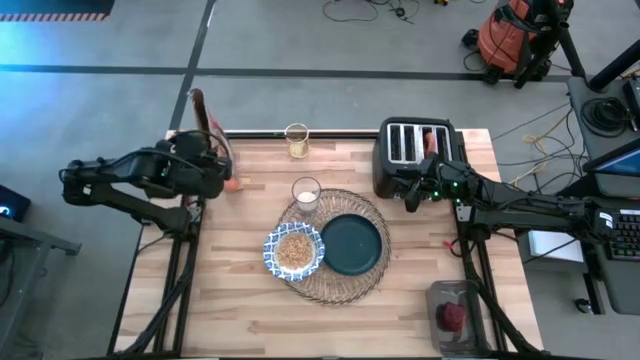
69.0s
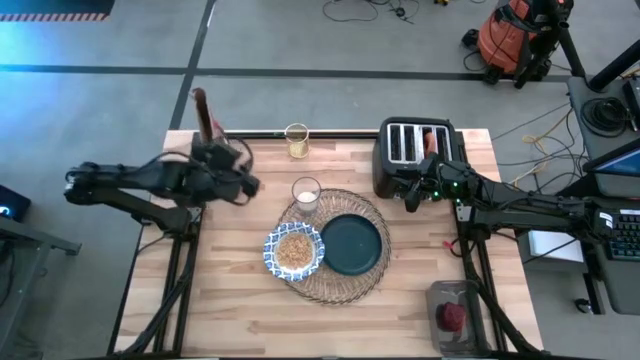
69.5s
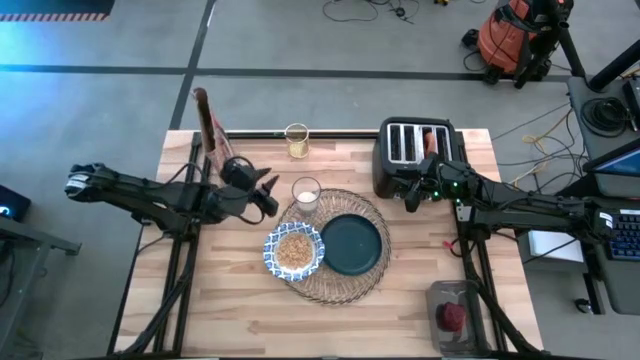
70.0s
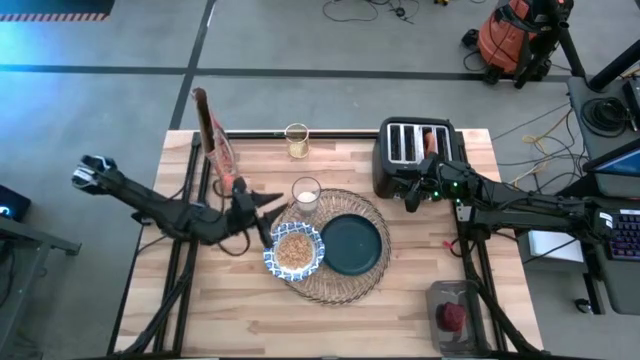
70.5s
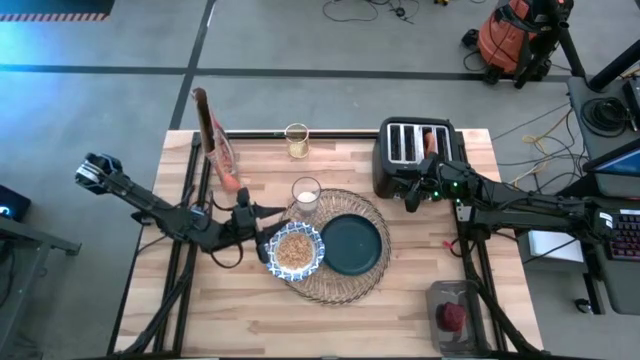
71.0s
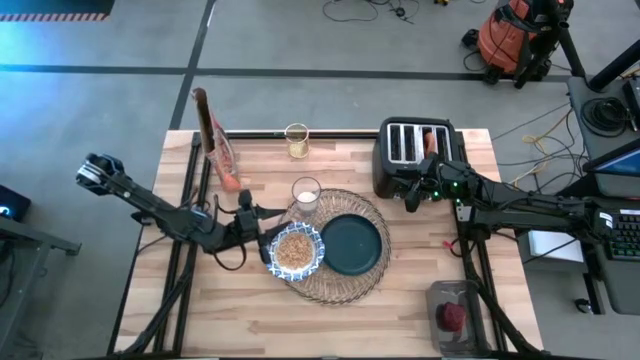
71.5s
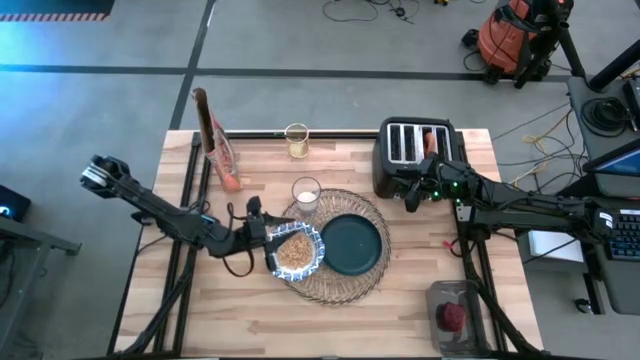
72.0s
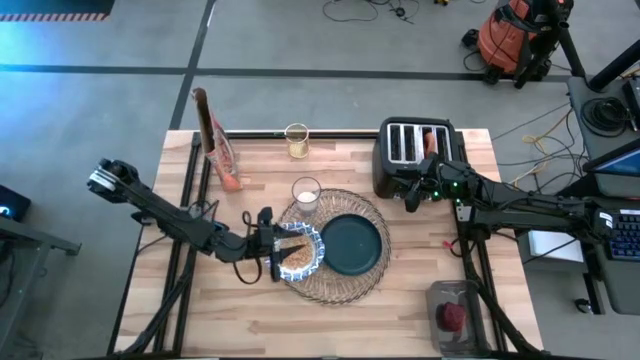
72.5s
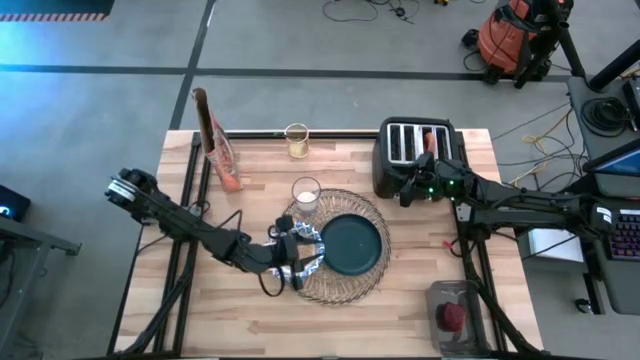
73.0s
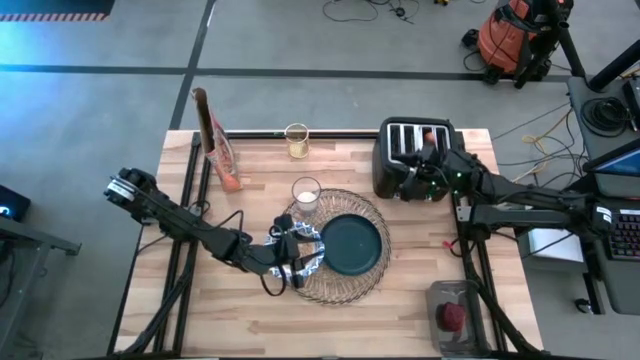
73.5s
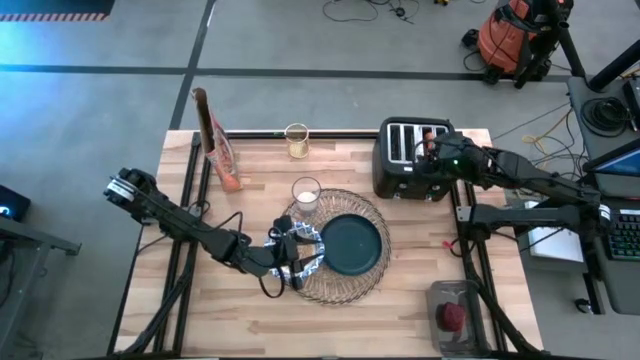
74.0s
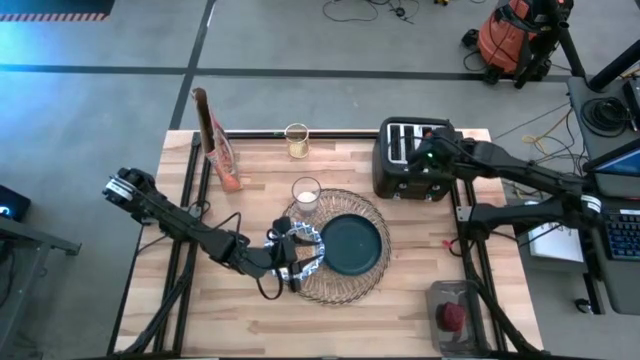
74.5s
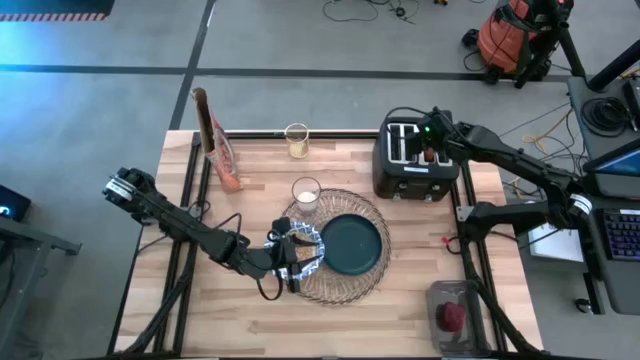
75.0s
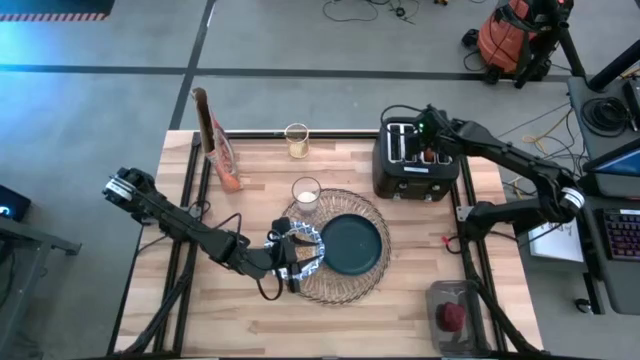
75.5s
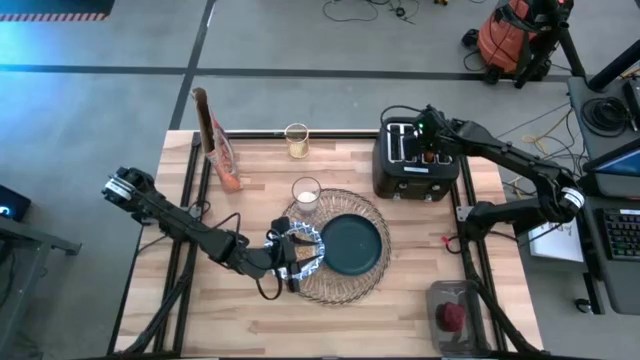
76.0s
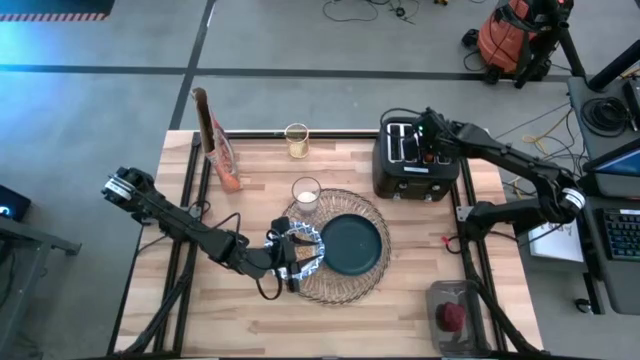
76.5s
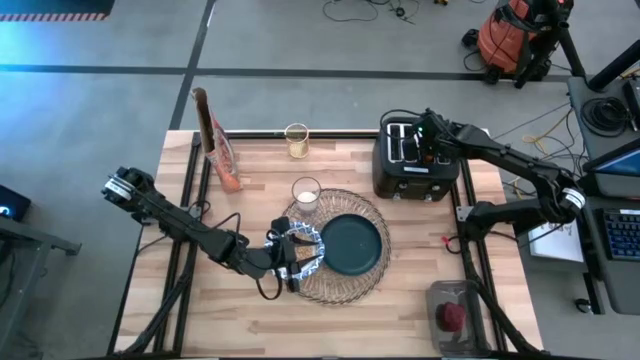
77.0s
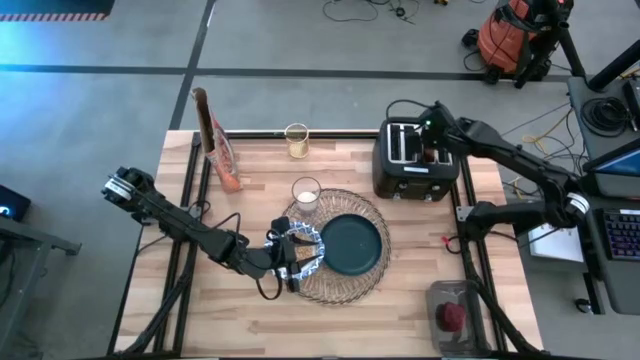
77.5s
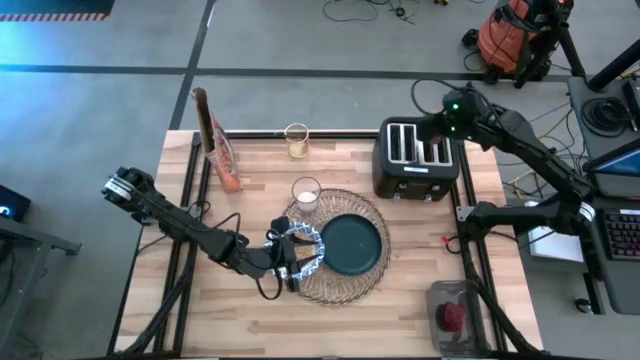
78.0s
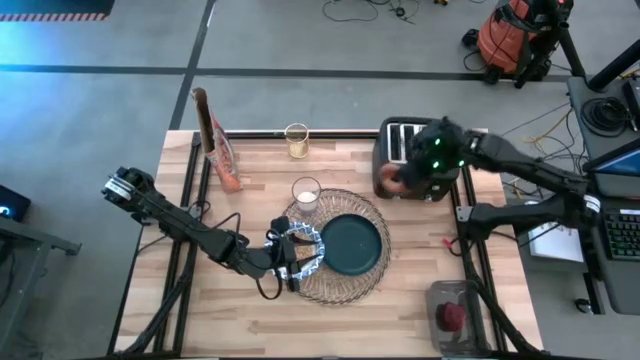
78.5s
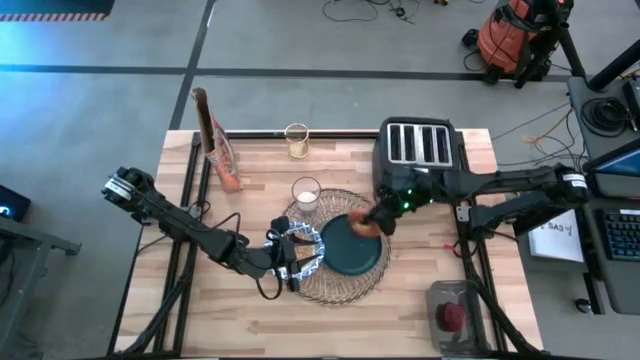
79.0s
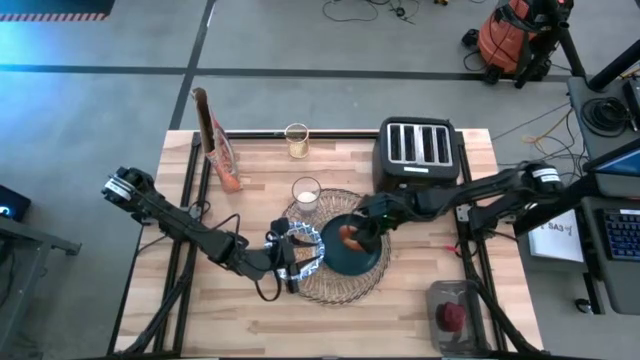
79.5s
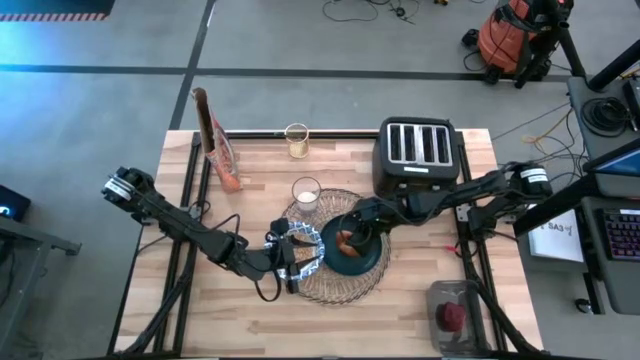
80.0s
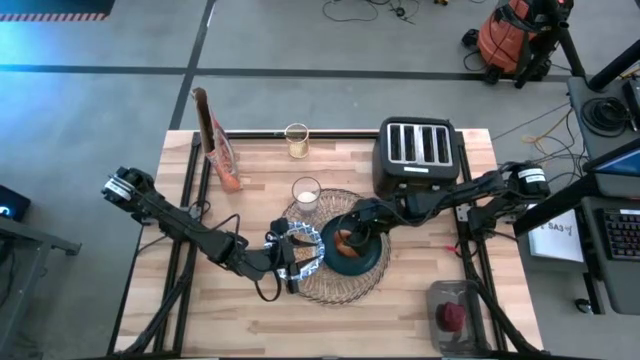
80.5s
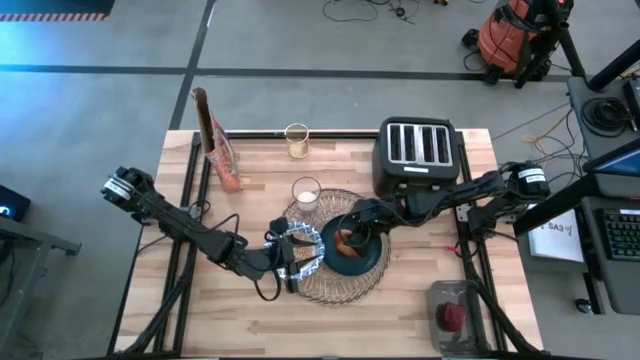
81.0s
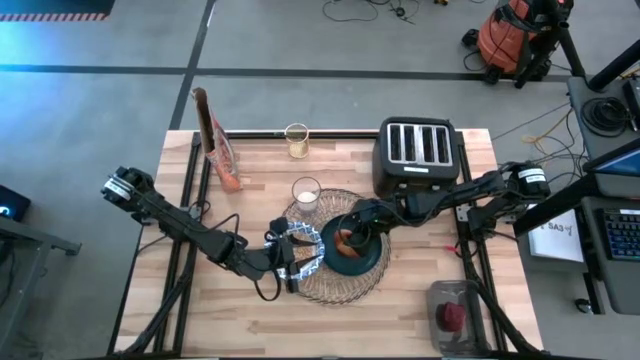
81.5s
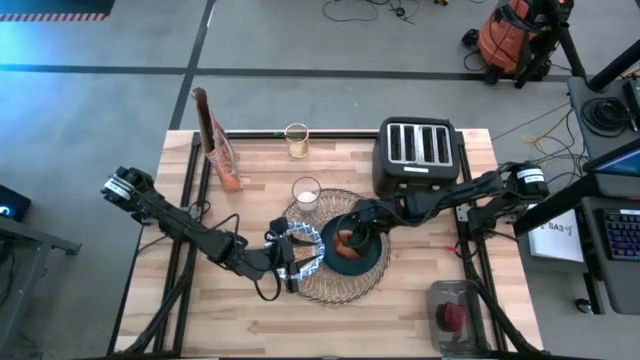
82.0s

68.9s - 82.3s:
Task: Arrange a breakfast setting
Put the brown toasted bagel on the the dark blue plate

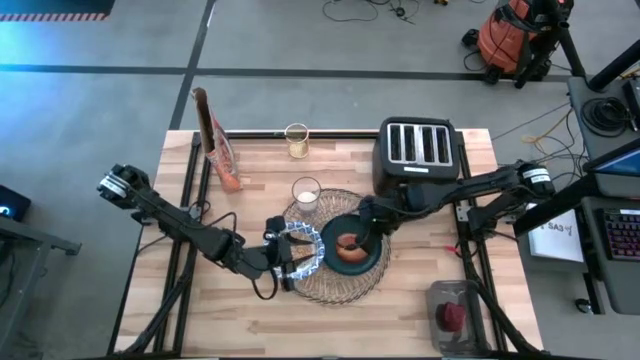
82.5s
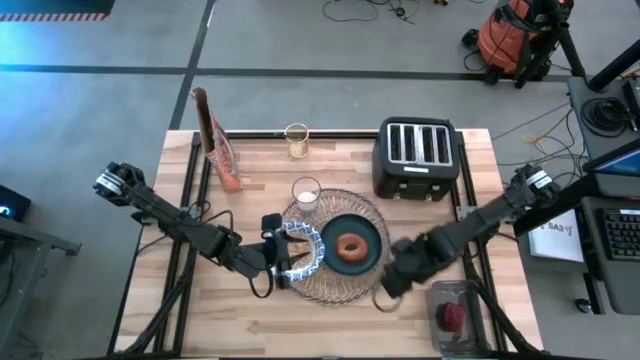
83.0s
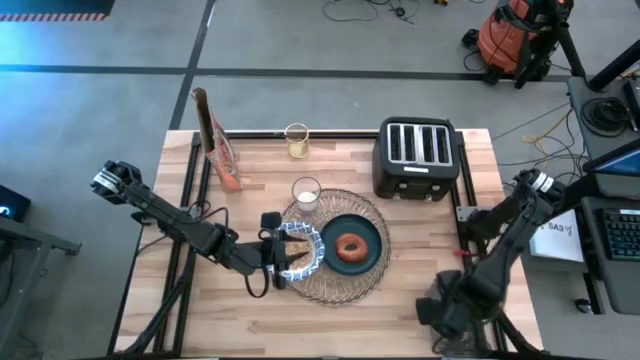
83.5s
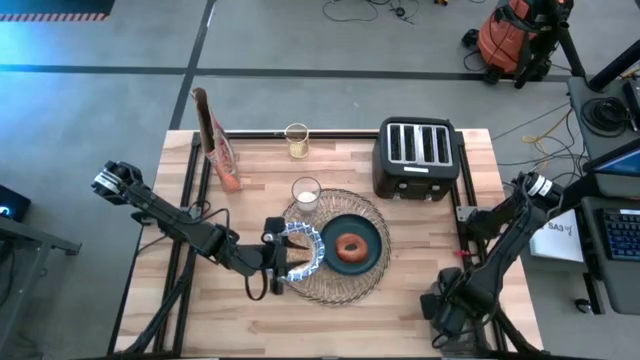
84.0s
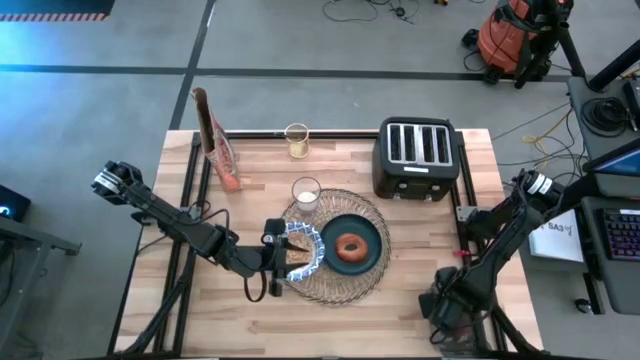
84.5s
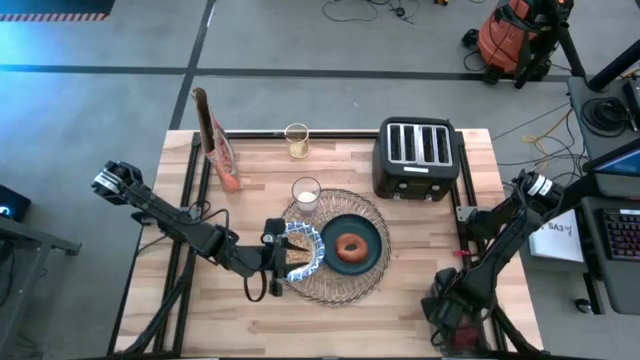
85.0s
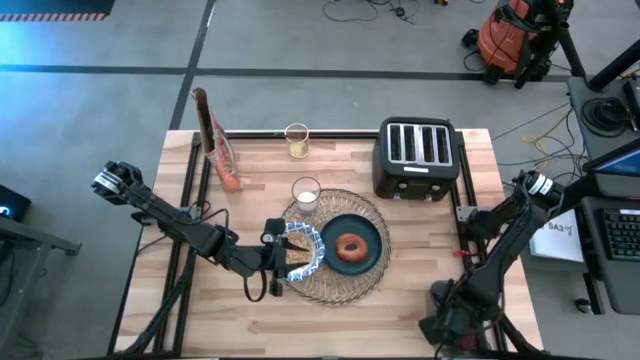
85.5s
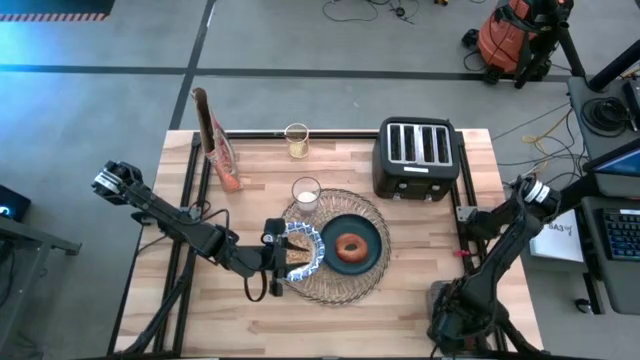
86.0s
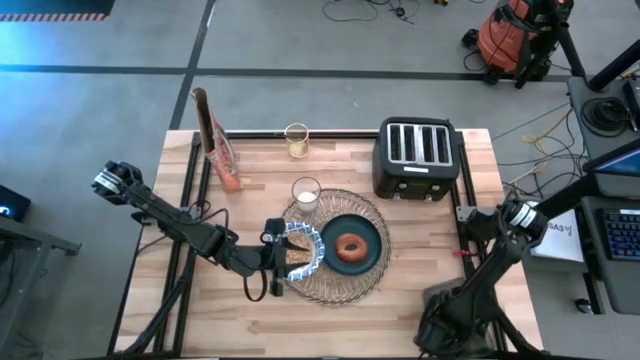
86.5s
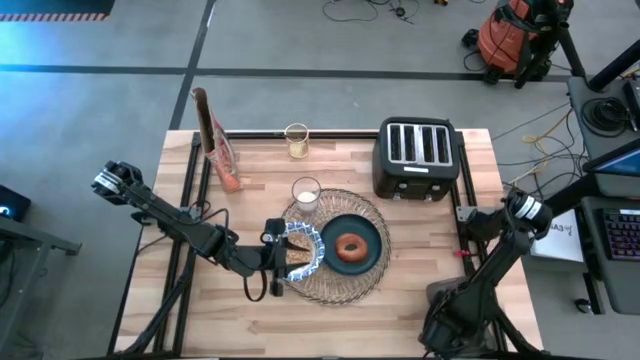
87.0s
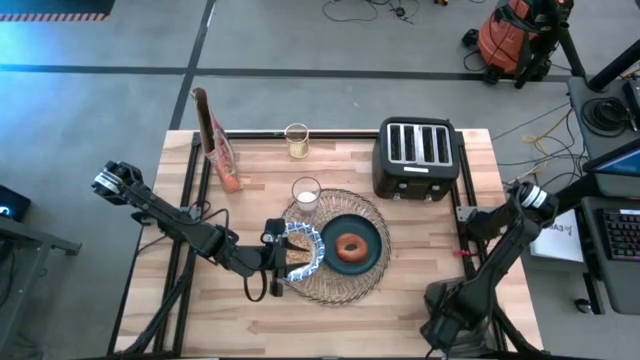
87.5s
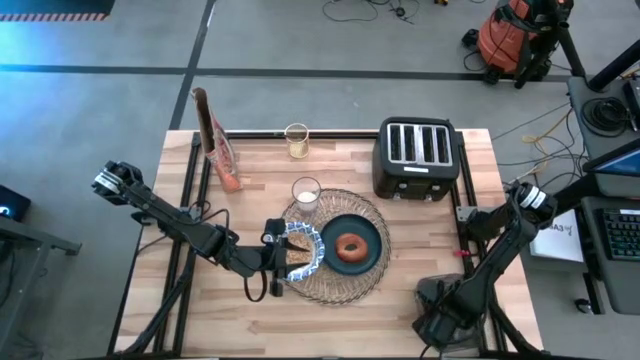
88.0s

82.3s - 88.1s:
Put the red apple on the brown placemat to the right of the cup of milk

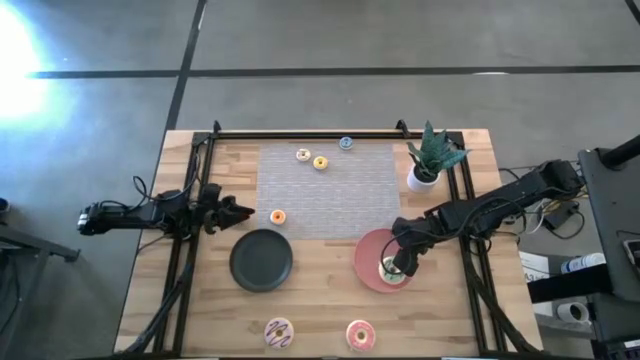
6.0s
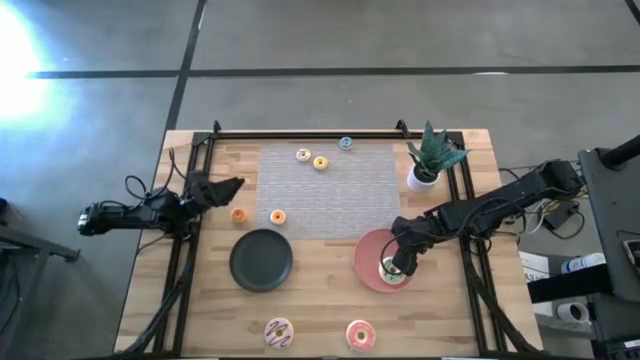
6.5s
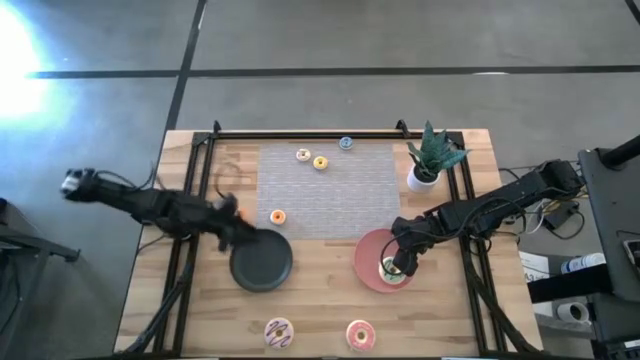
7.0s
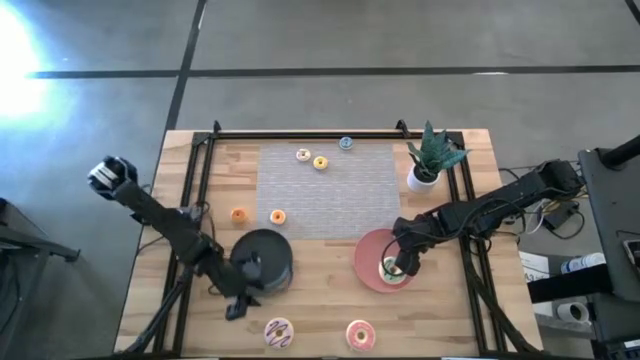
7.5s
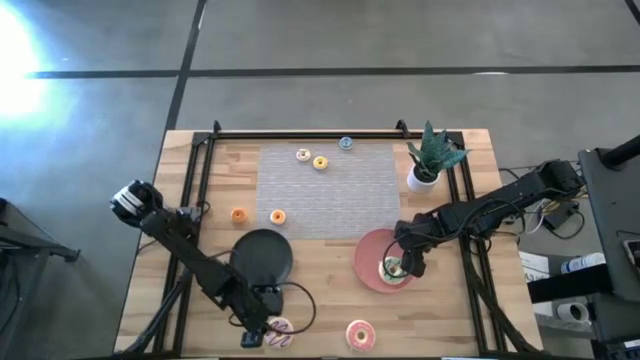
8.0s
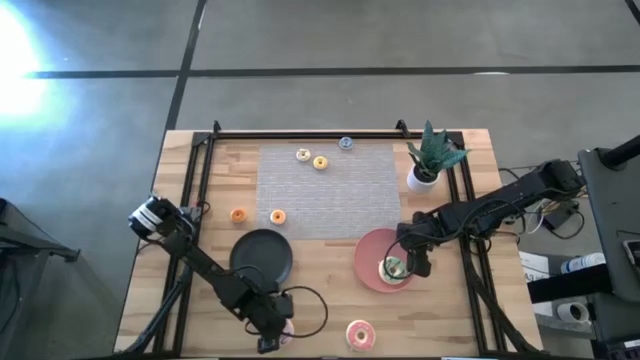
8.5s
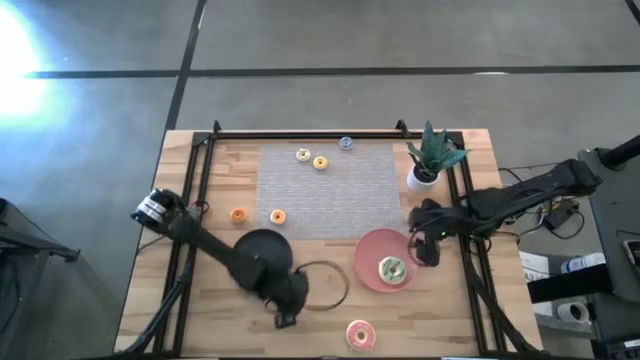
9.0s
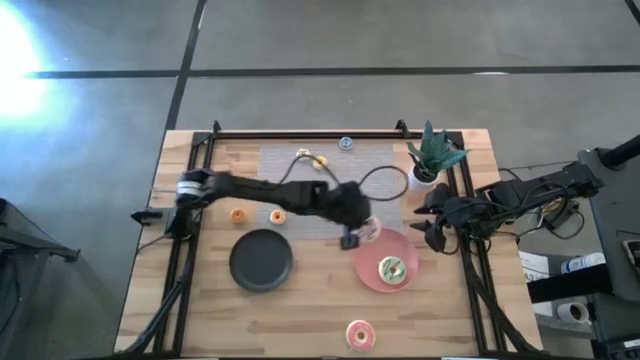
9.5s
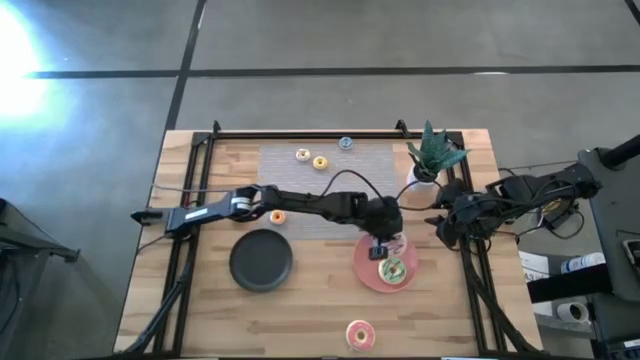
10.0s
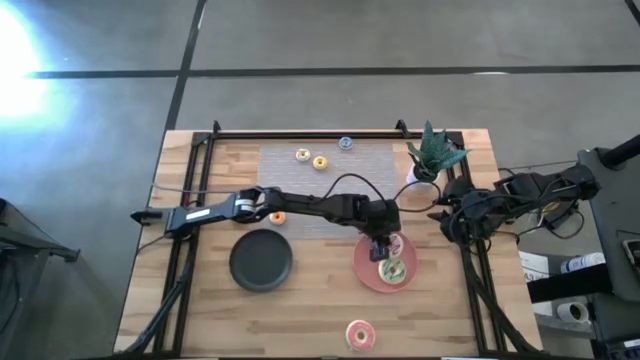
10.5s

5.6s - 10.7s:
Task: Pick & Place donuts
Put the large purple donut on the pink plate
